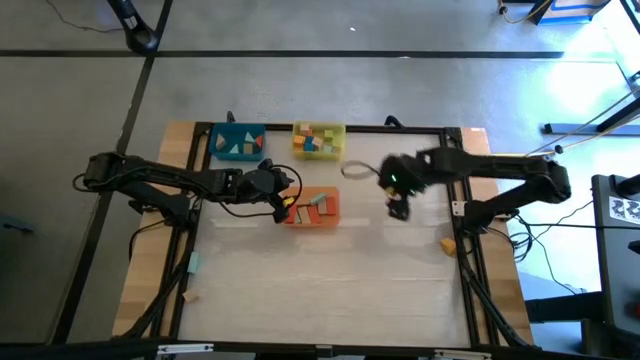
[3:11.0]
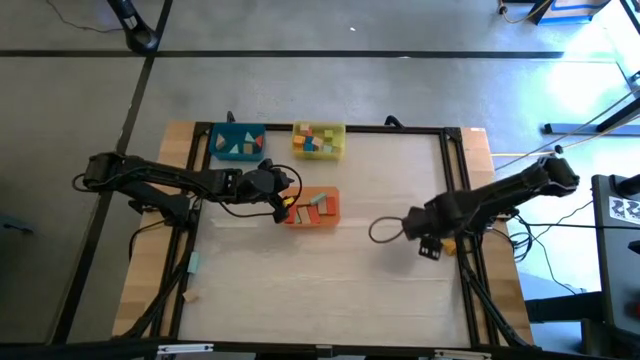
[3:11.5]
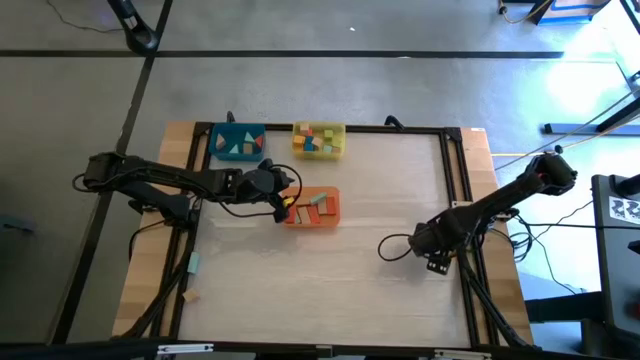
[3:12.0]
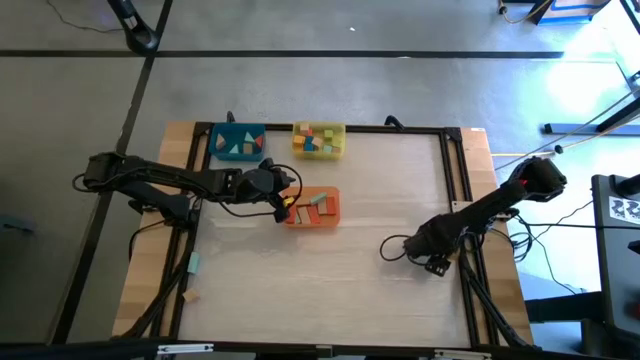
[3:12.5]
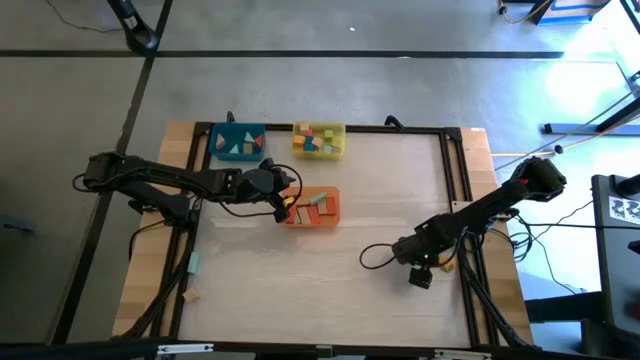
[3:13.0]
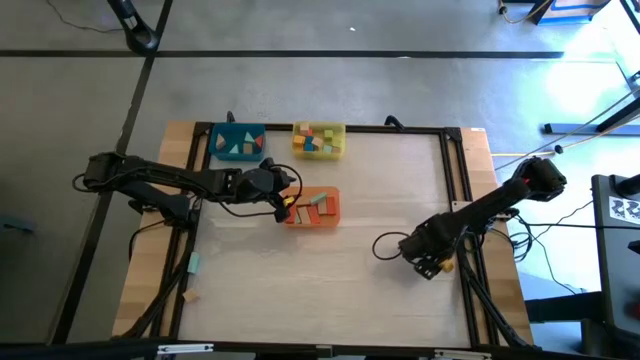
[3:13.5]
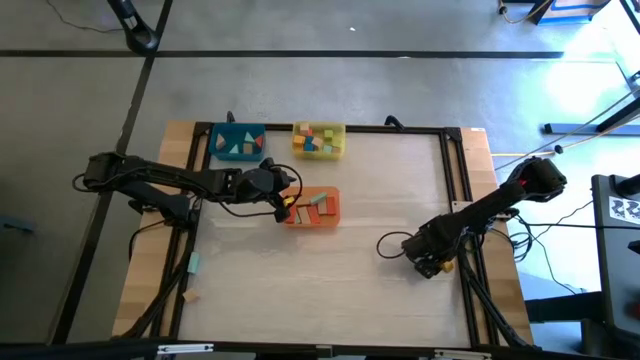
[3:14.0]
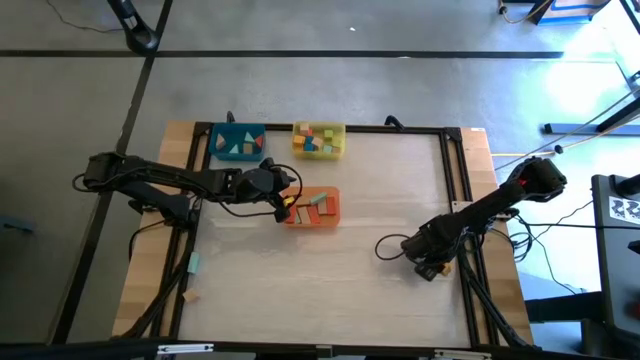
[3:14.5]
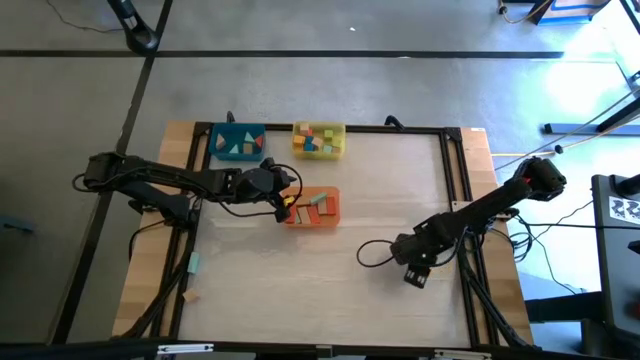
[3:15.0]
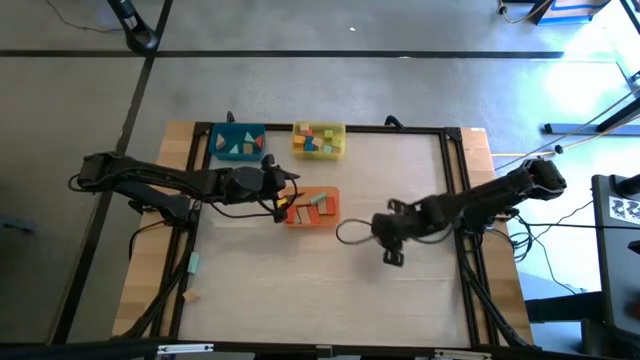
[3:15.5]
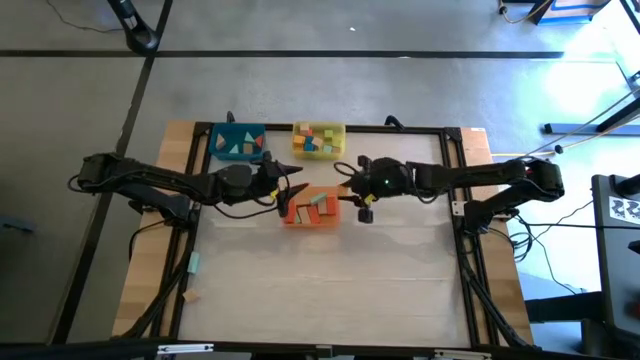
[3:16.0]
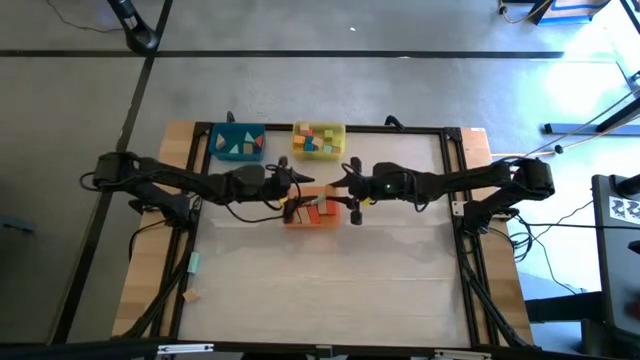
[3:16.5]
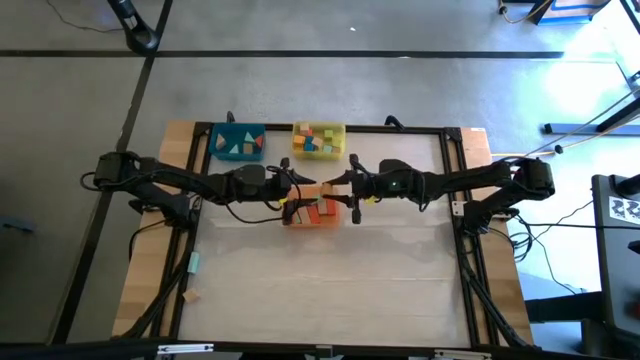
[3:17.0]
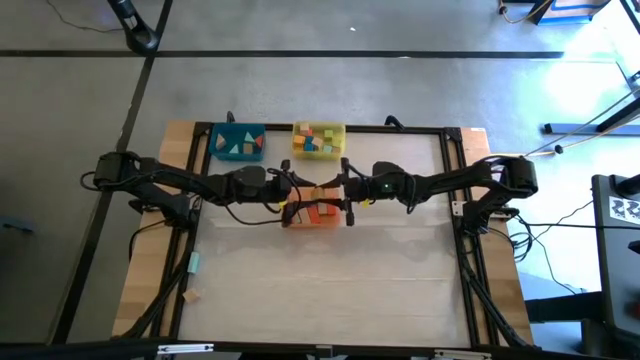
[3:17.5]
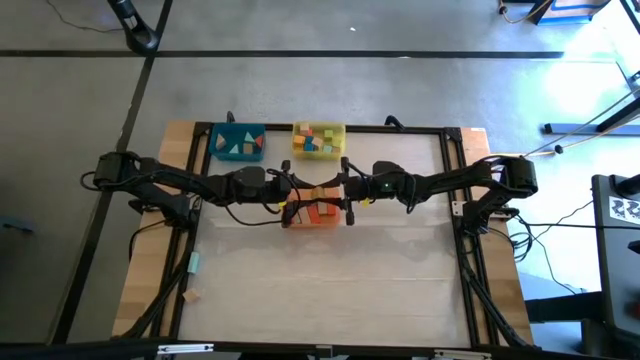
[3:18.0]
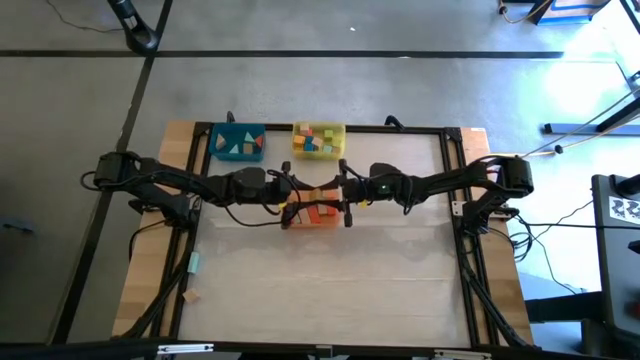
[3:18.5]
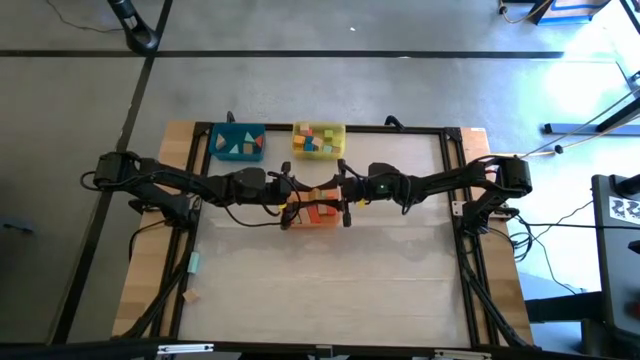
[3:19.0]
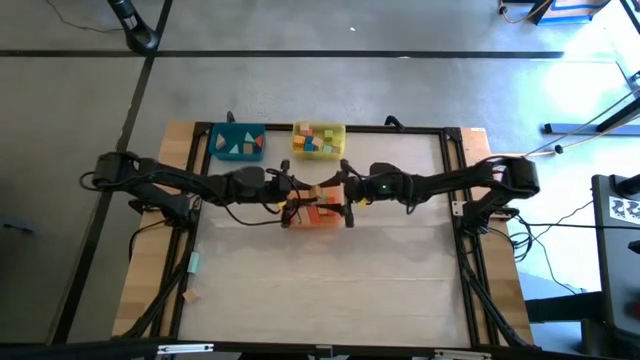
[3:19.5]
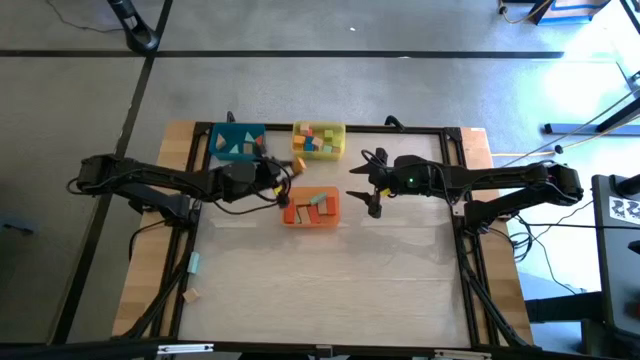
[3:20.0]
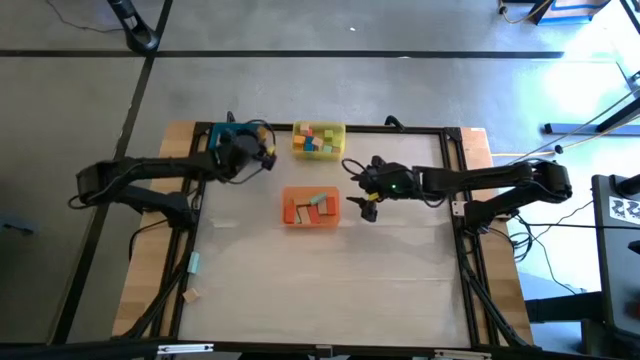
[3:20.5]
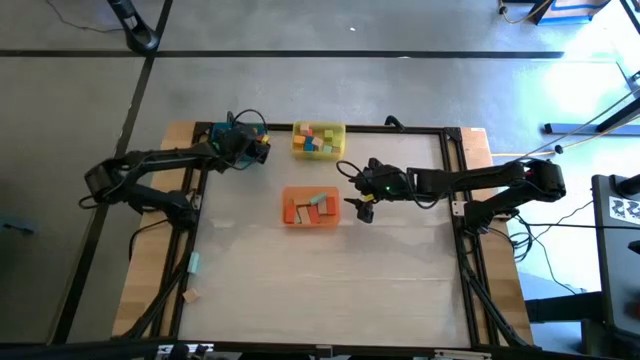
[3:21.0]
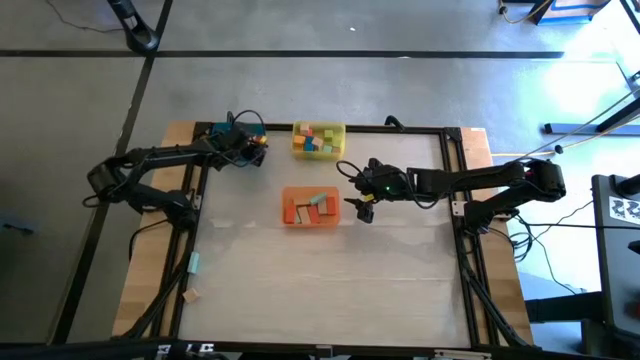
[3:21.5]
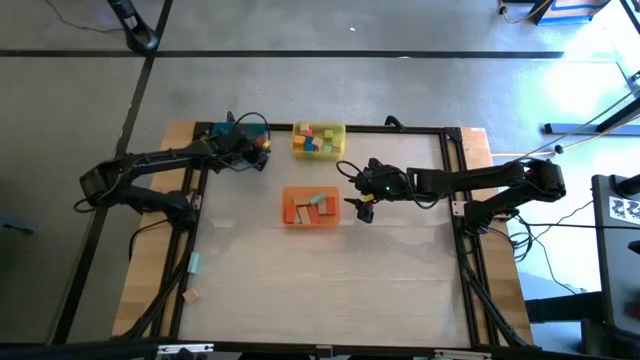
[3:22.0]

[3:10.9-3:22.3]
Task: Sort blocks by size
Put the yellow triangle block into the blue bin

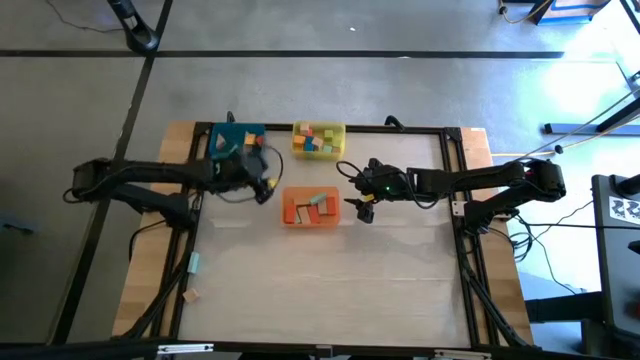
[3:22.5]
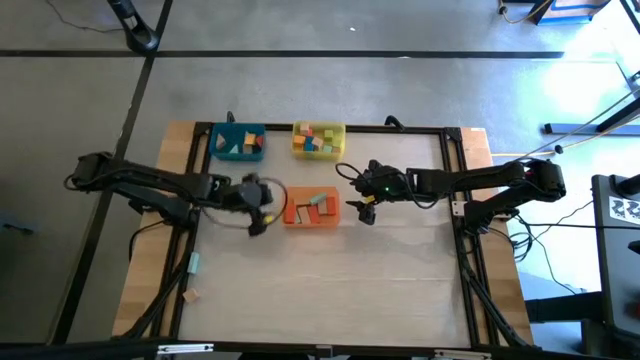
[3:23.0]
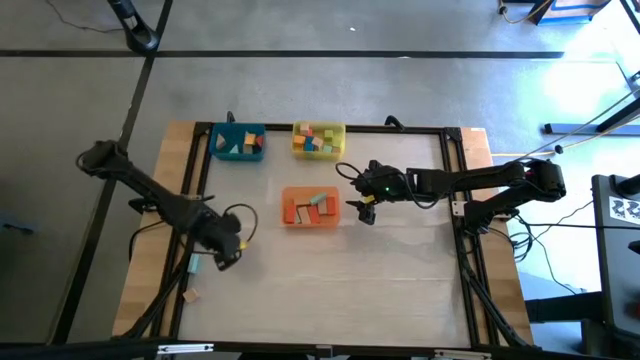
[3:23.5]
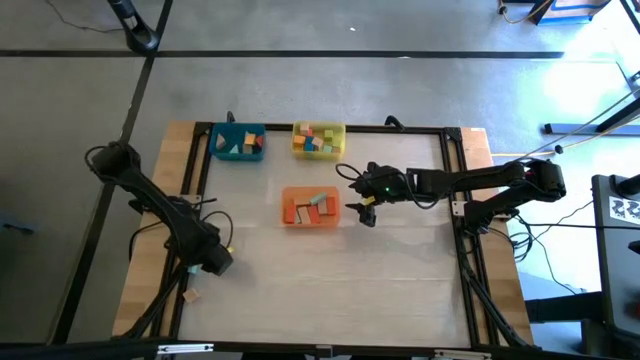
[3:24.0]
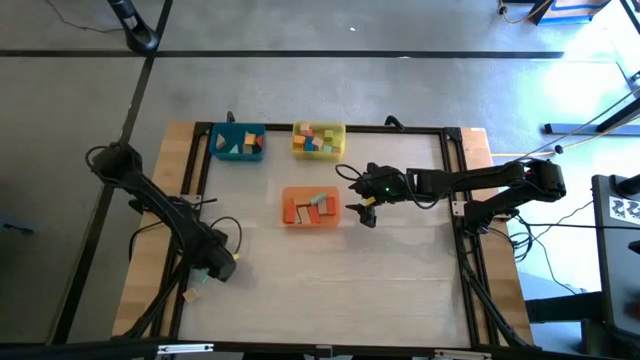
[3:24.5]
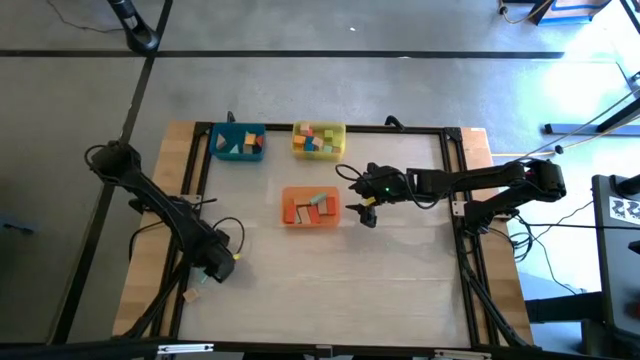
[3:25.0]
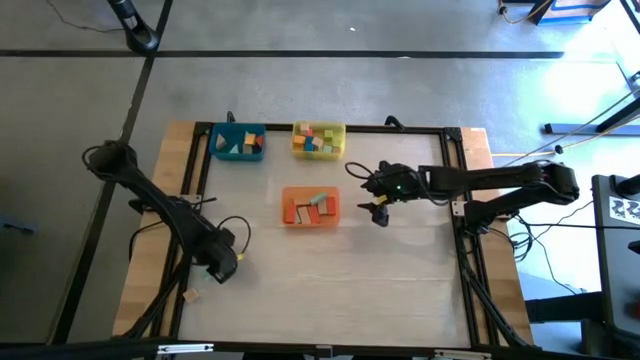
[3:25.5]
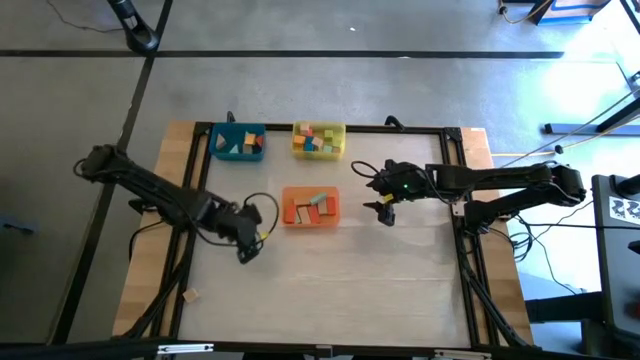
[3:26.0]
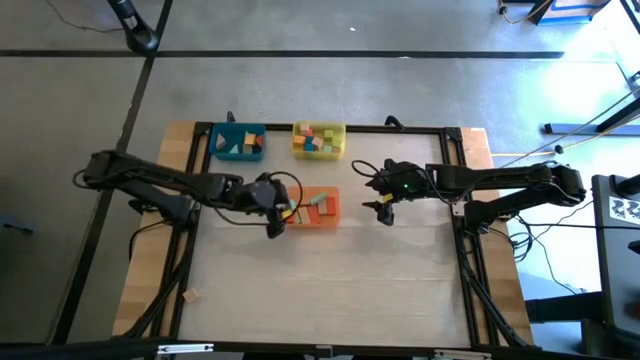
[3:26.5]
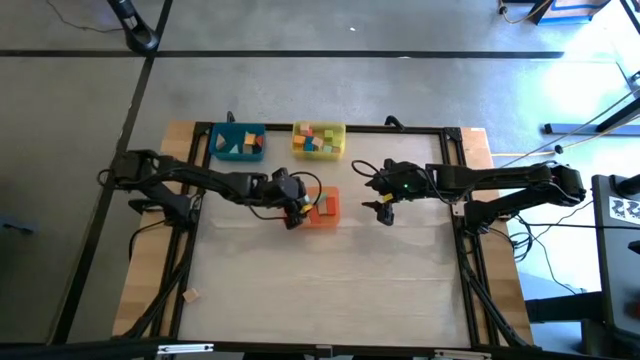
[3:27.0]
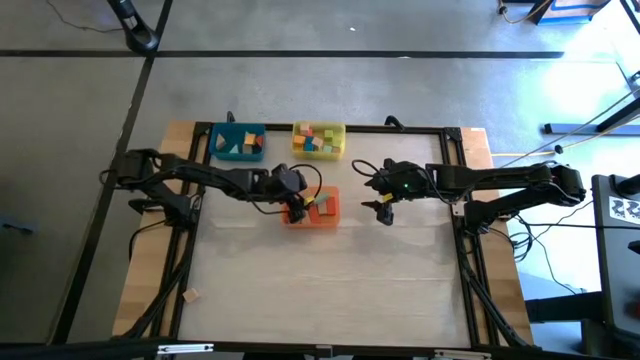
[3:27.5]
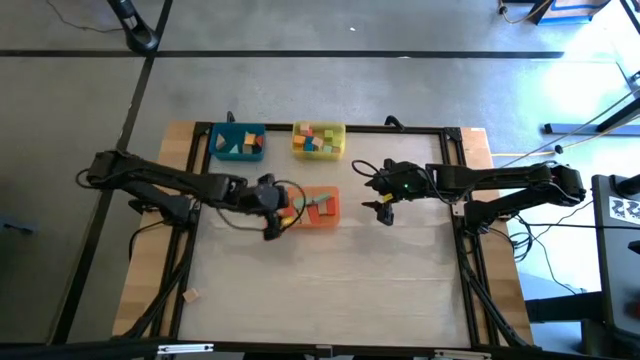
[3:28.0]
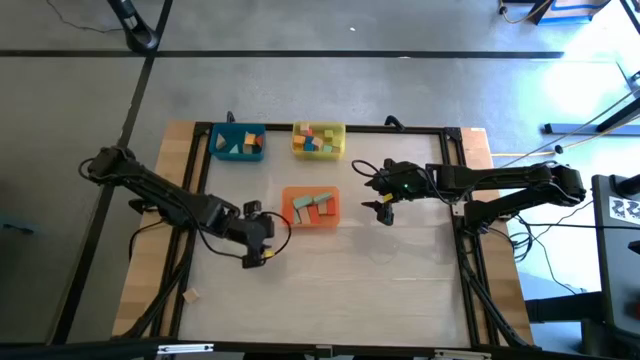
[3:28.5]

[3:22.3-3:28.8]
Put the light blue rectangle block into the orange bin

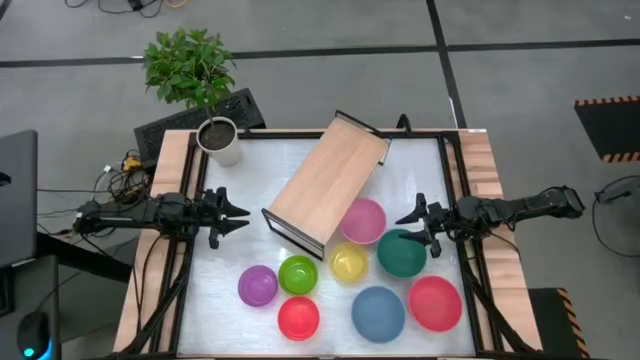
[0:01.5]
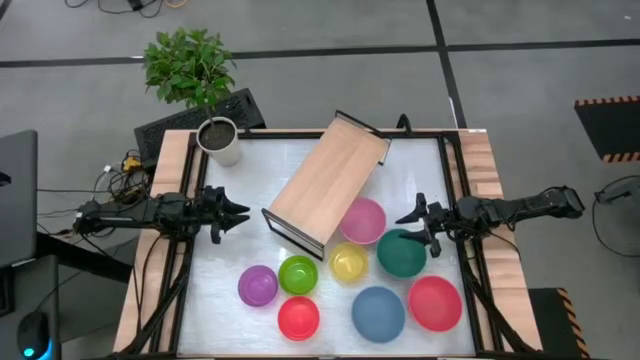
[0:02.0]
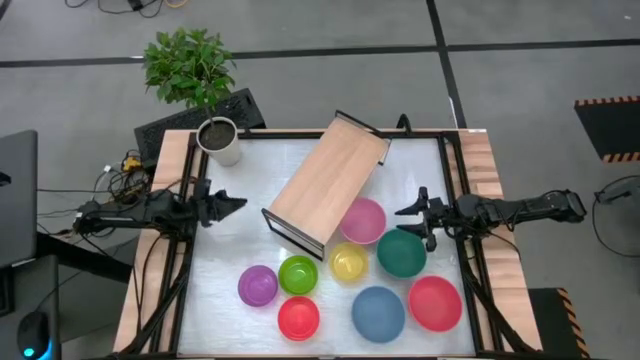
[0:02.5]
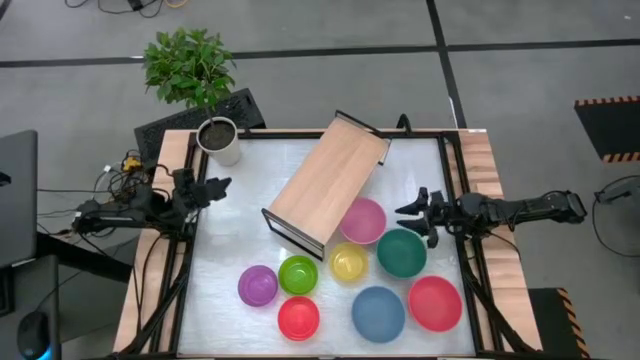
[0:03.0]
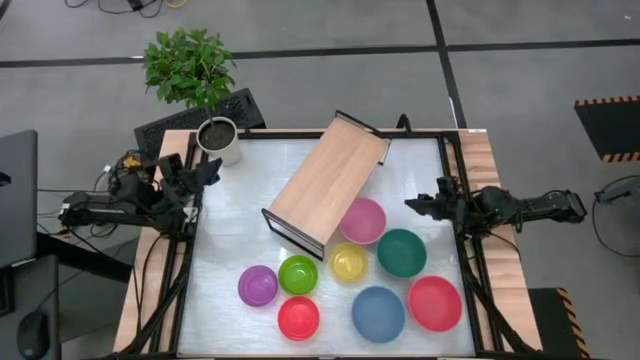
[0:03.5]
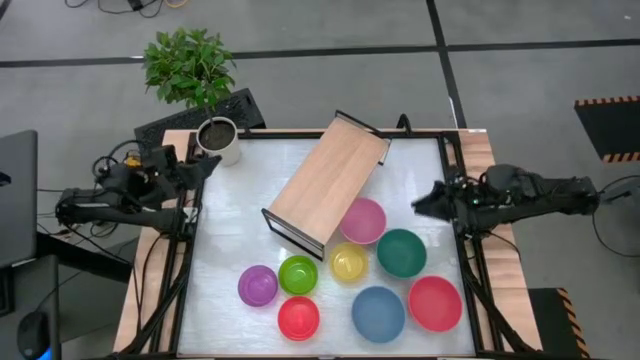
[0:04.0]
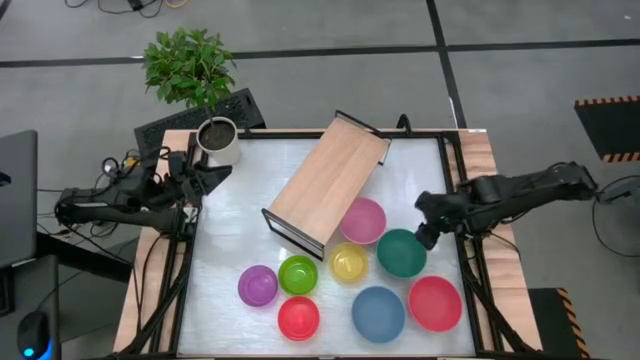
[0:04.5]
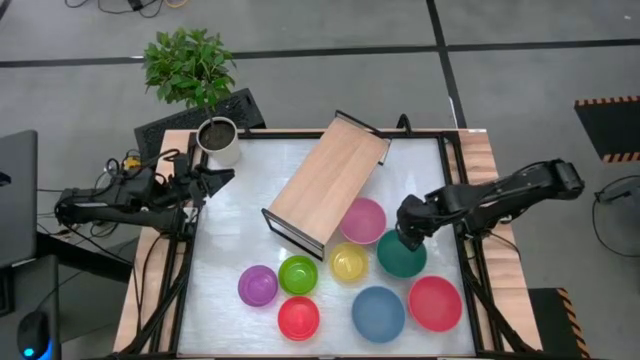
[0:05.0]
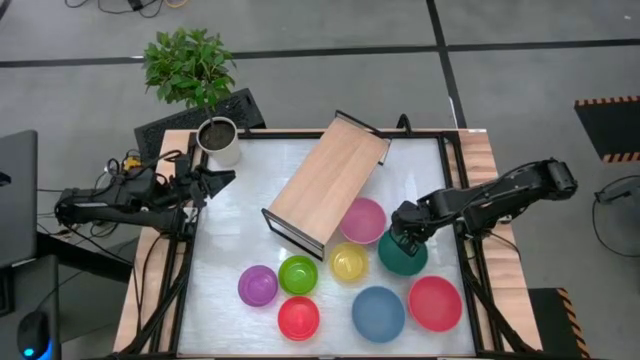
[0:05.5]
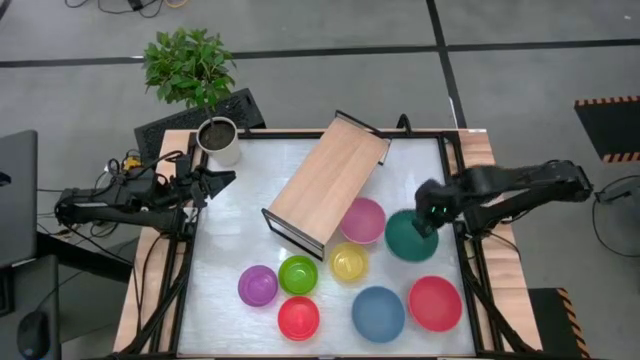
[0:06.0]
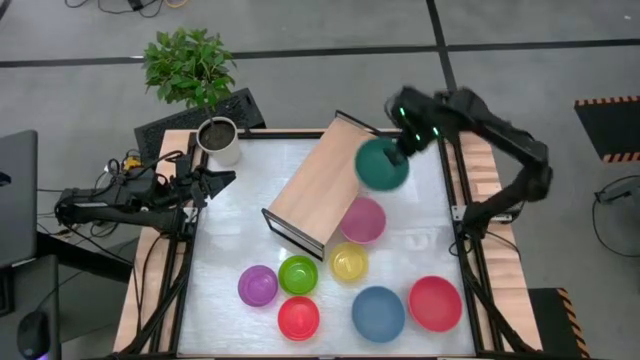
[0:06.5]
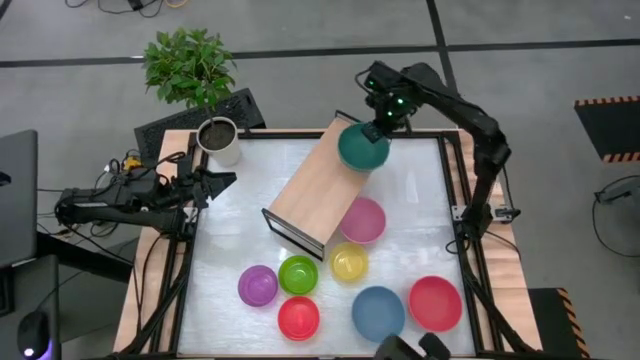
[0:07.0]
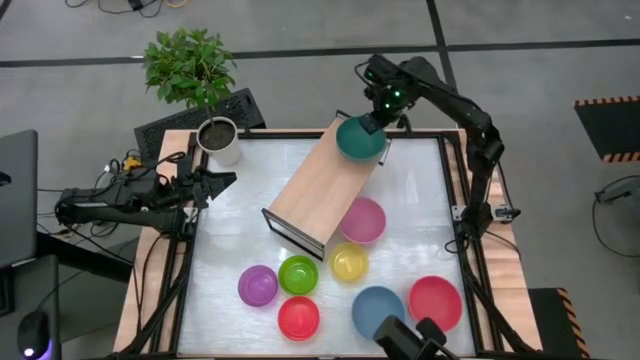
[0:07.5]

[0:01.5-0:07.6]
Task: Place and stack bowls onto a shelf
Put the green bowl on the shelf
